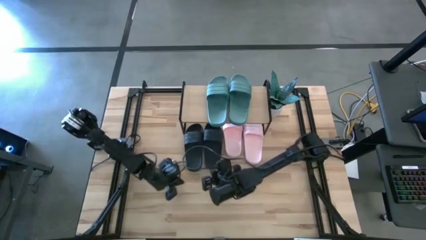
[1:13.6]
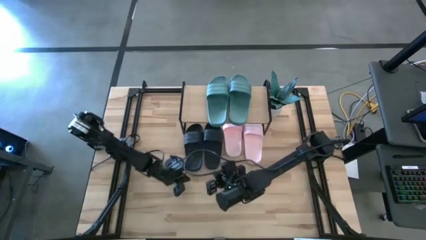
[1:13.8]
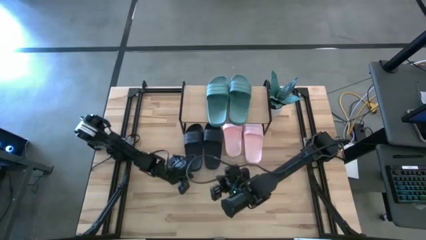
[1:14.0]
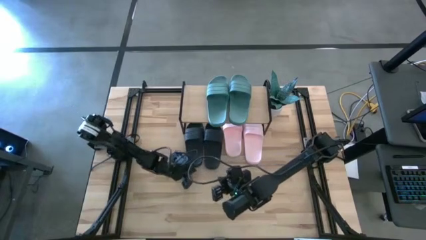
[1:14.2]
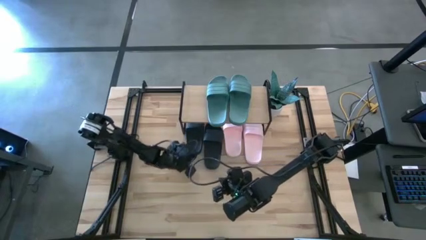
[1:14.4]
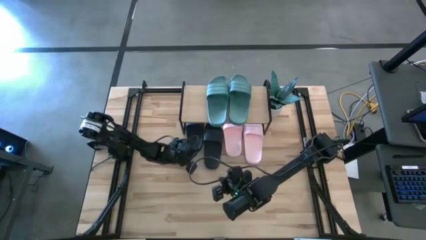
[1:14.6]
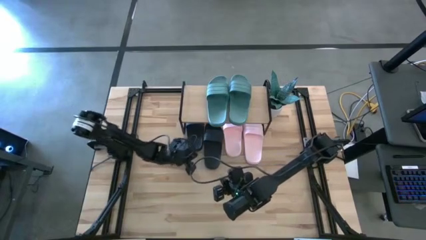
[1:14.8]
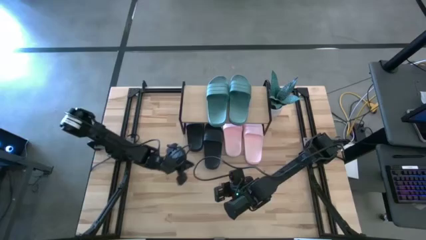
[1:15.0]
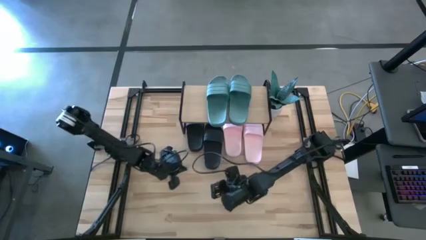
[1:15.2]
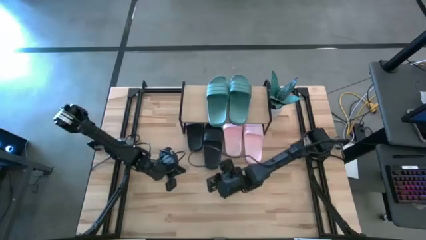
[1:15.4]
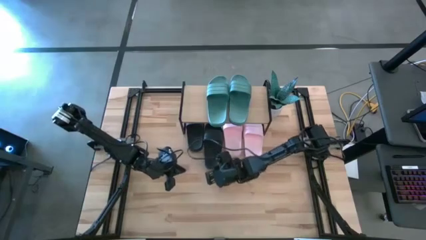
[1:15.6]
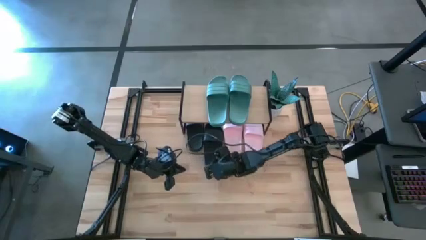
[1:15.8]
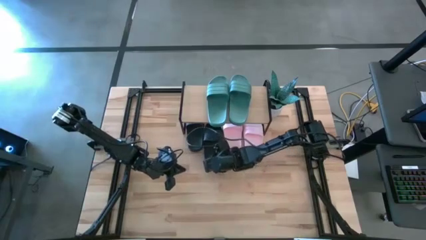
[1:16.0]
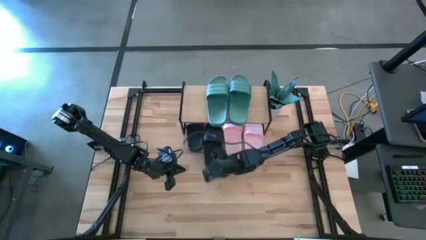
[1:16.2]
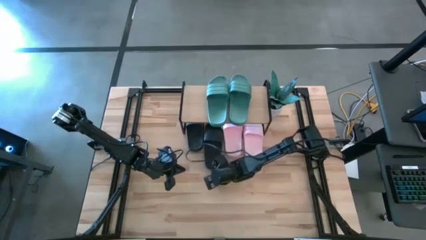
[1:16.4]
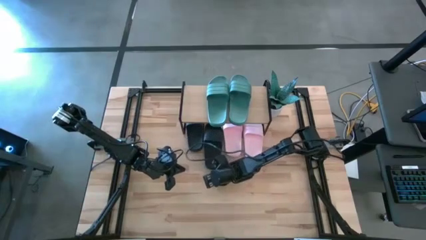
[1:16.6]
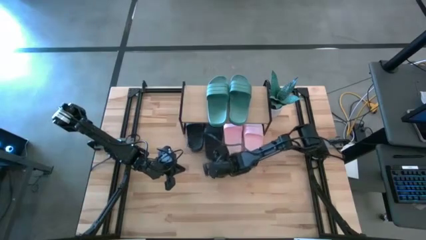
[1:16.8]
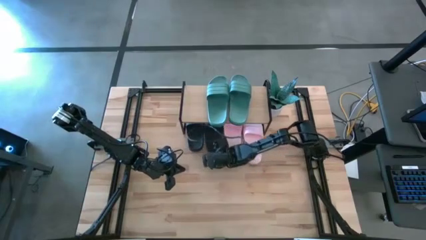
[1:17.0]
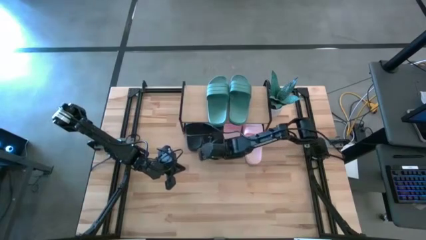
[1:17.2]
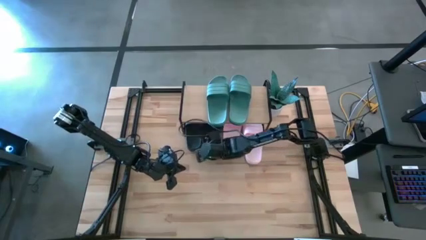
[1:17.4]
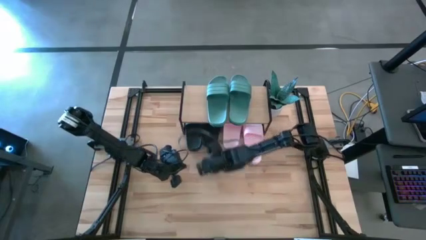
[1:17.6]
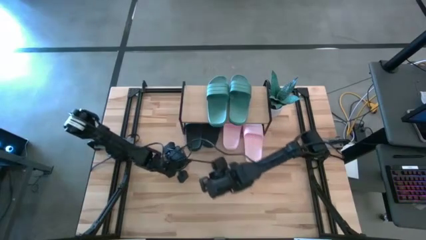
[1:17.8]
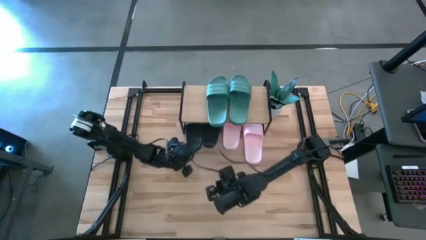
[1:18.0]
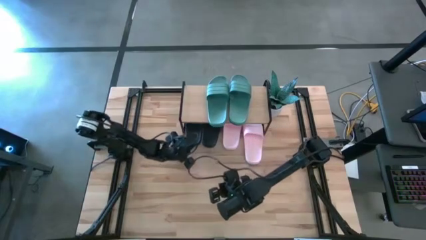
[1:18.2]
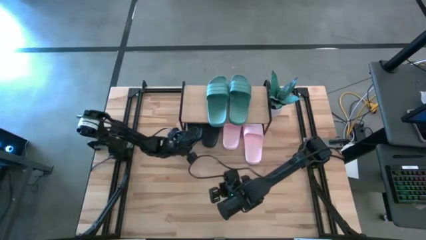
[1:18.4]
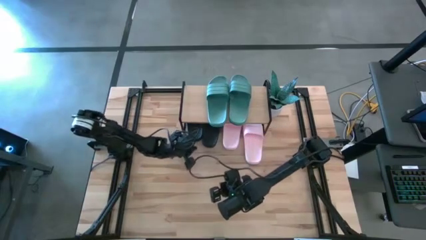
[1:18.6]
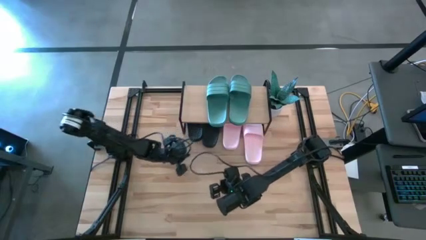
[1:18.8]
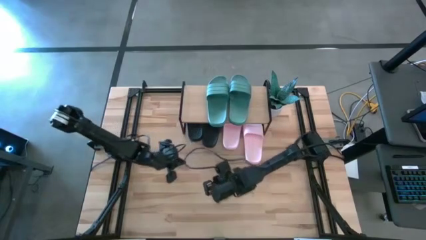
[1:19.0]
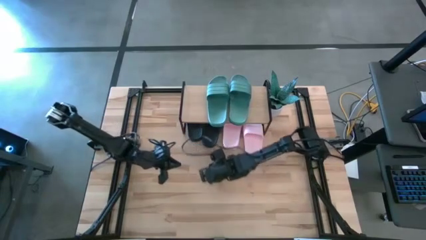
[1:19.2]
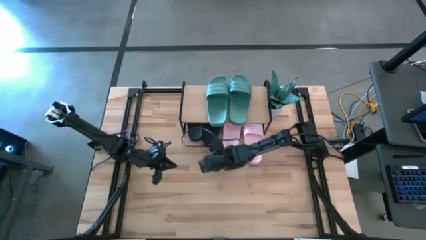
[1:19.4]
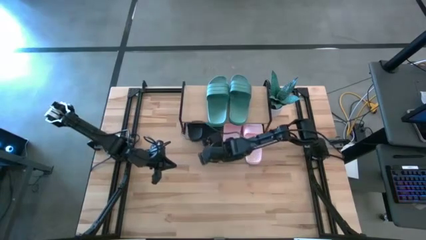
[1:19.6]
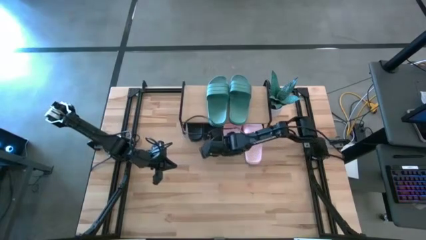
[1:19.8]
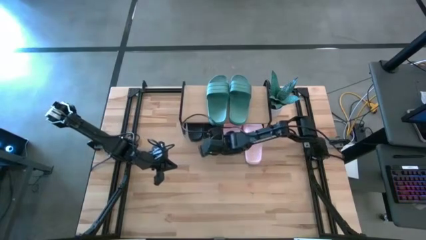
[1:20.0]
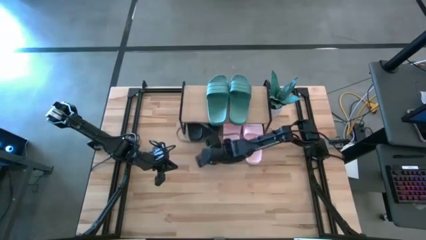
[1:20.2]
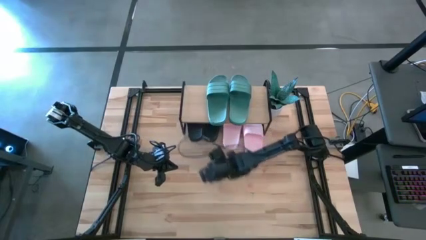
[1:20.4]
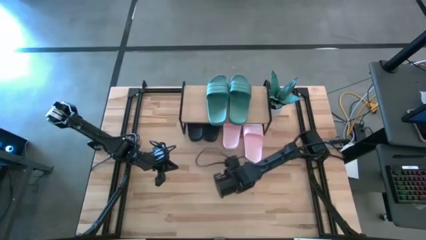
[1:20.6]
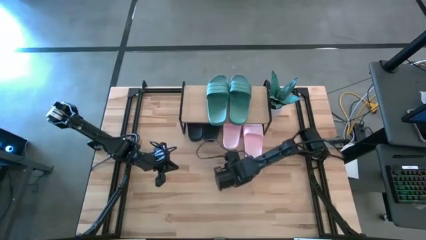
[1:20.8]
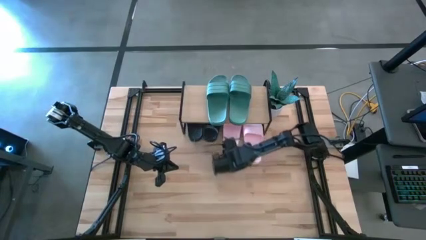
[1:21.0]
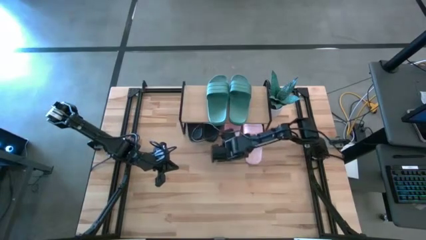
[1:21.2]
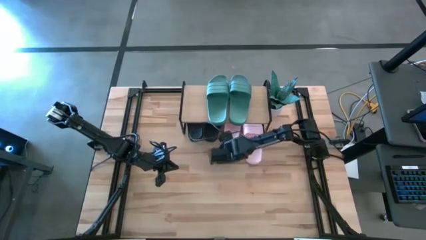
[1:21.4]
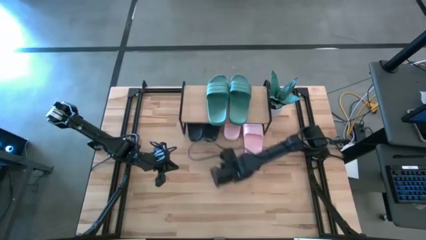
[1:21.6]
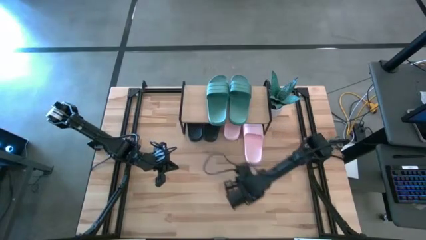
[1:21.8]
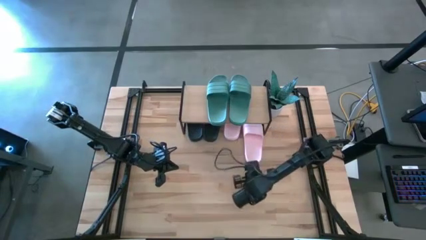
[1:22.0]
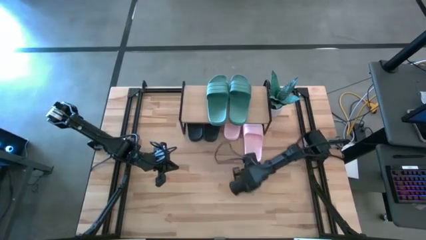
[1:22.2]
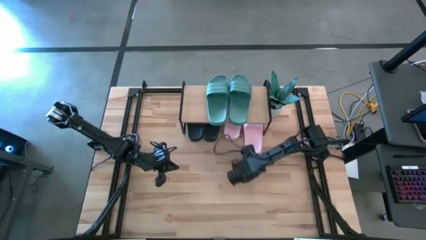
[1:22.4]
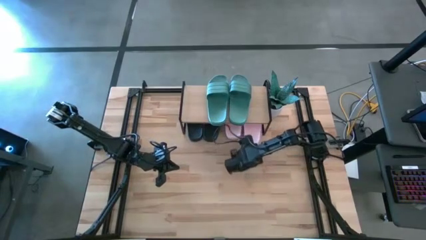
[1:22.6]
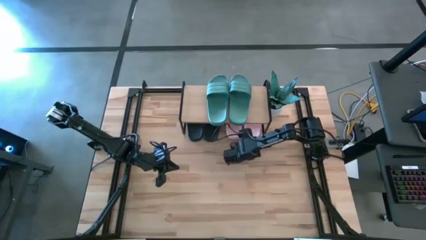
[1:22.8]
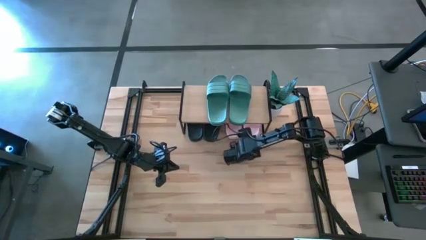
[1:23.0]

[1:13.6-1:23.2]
Task: Pick and place slides into the shelf
Put the black pair of slides under the shelf

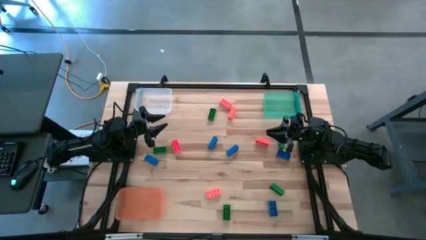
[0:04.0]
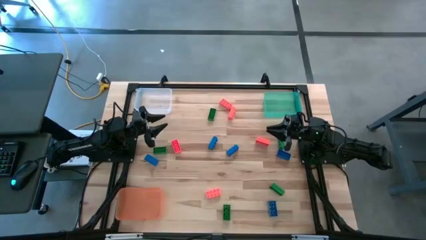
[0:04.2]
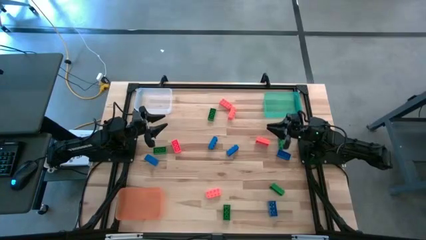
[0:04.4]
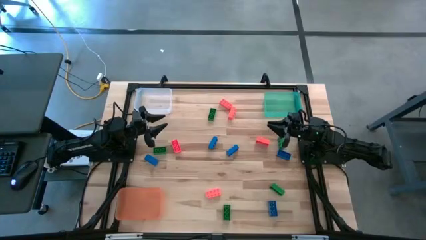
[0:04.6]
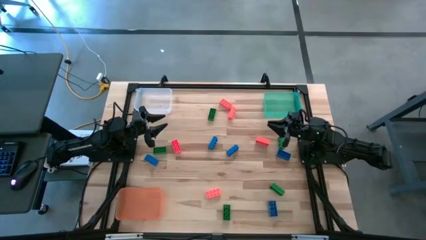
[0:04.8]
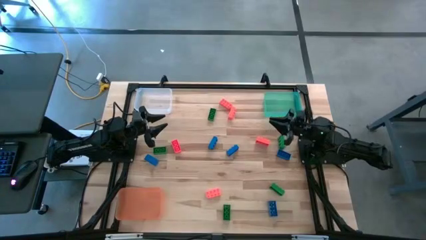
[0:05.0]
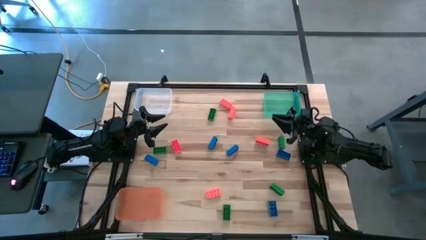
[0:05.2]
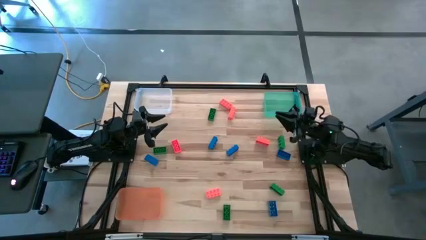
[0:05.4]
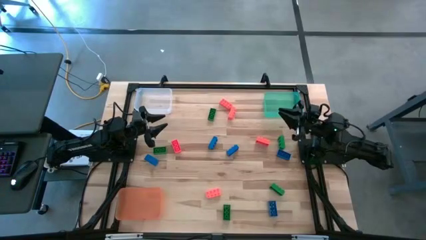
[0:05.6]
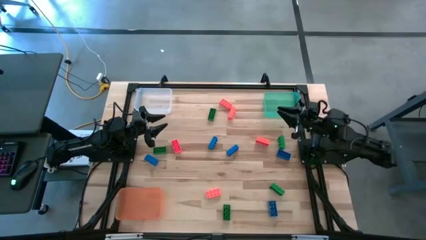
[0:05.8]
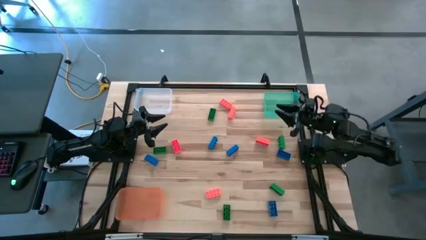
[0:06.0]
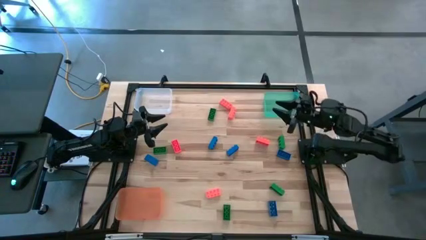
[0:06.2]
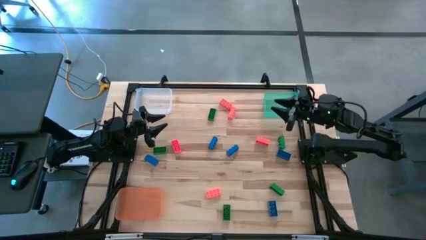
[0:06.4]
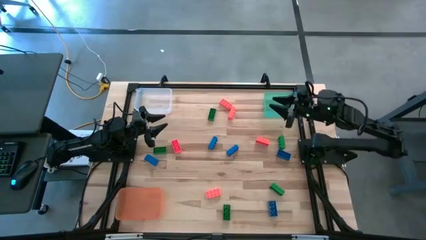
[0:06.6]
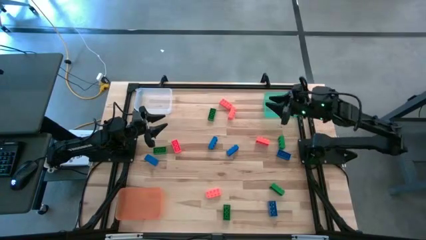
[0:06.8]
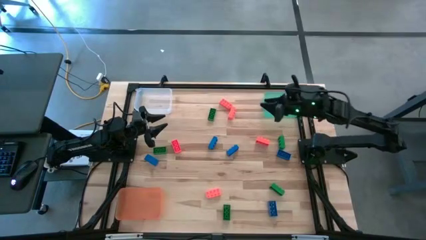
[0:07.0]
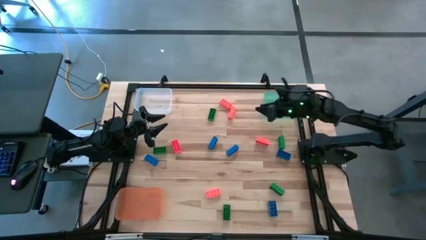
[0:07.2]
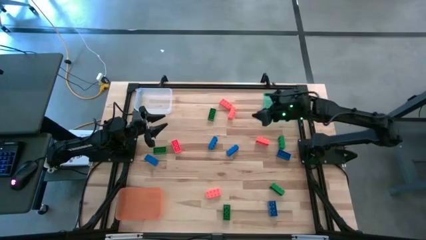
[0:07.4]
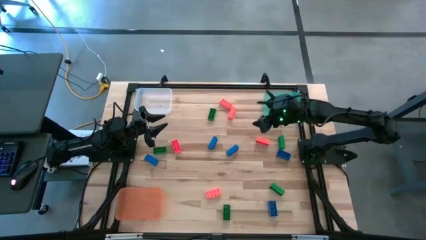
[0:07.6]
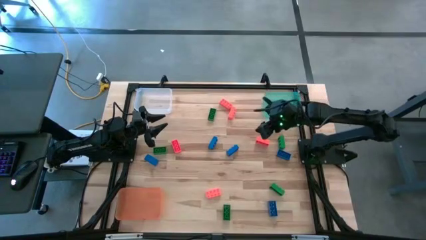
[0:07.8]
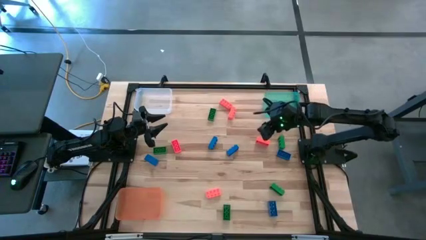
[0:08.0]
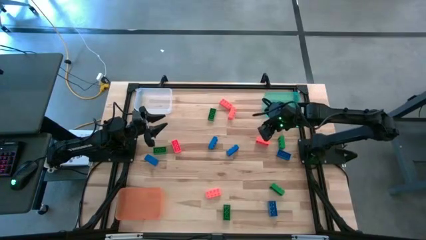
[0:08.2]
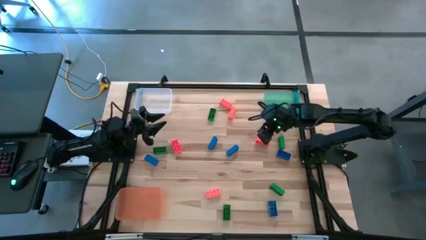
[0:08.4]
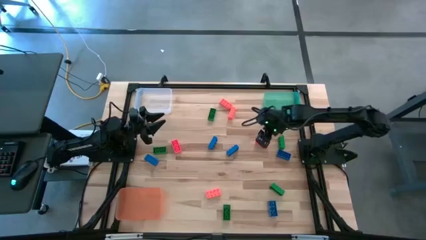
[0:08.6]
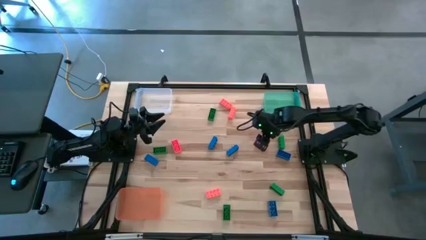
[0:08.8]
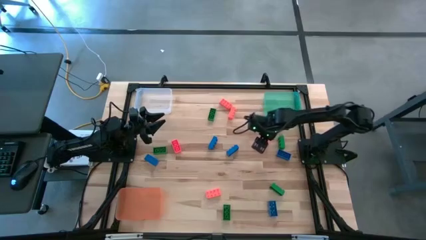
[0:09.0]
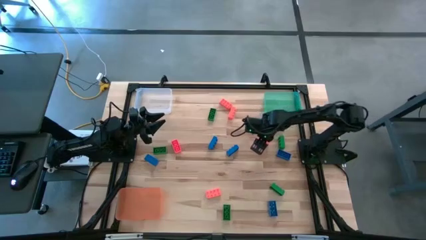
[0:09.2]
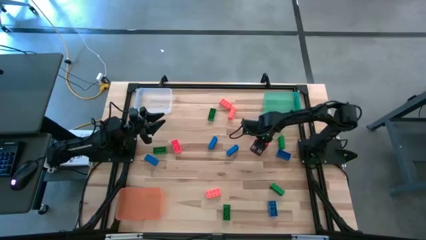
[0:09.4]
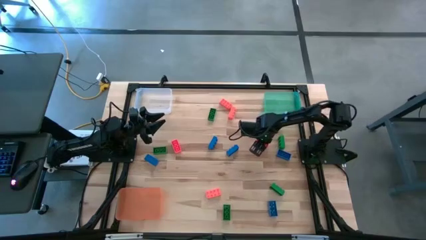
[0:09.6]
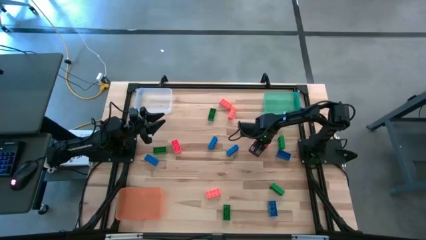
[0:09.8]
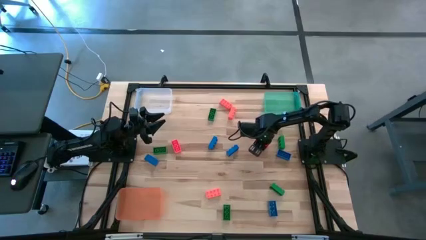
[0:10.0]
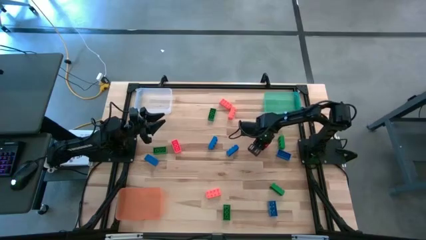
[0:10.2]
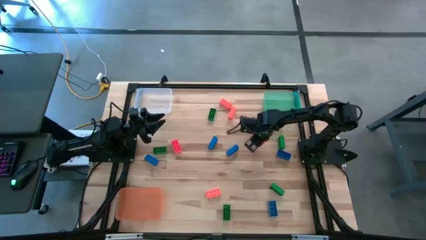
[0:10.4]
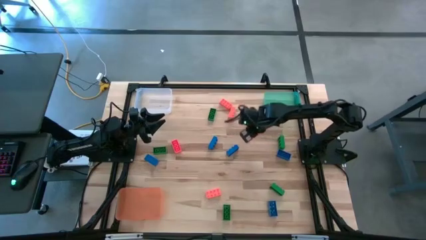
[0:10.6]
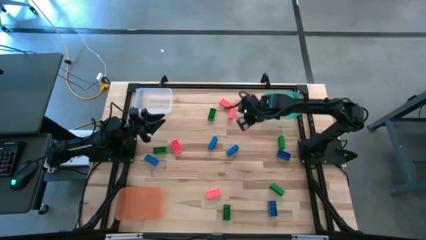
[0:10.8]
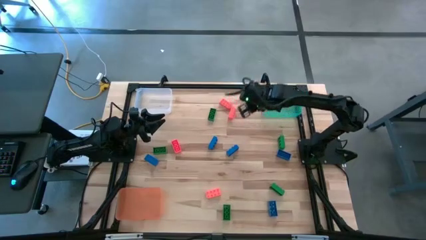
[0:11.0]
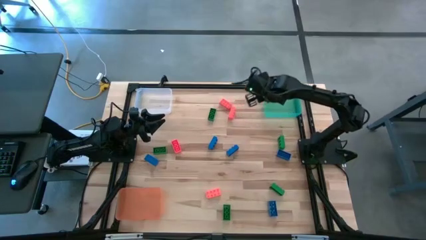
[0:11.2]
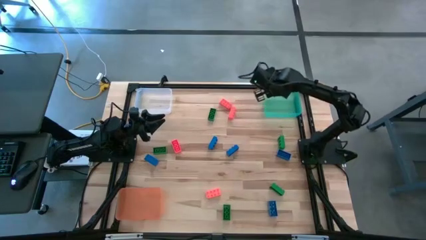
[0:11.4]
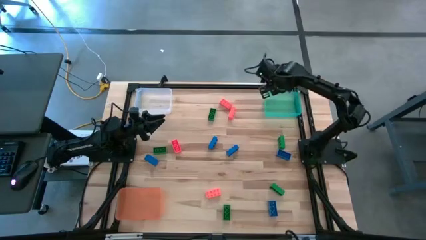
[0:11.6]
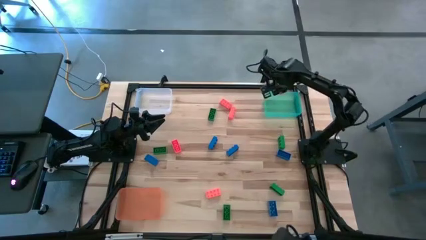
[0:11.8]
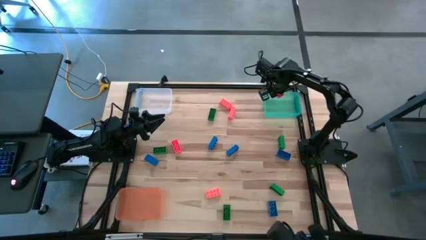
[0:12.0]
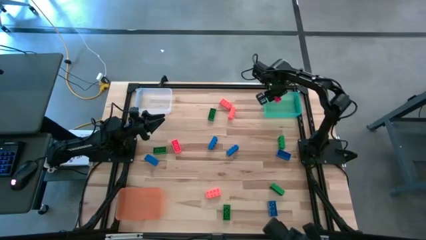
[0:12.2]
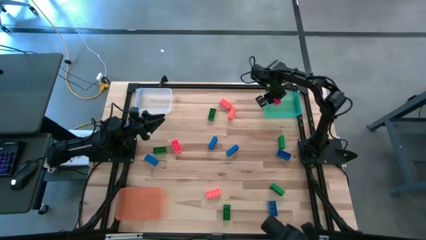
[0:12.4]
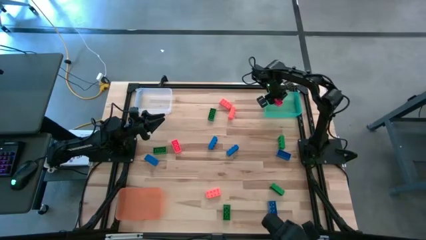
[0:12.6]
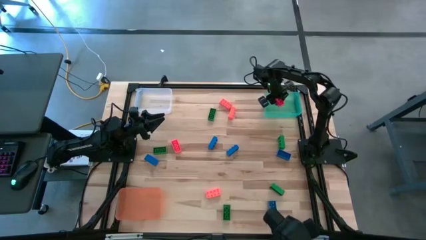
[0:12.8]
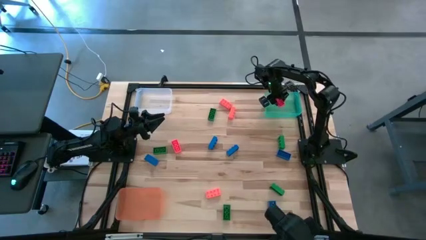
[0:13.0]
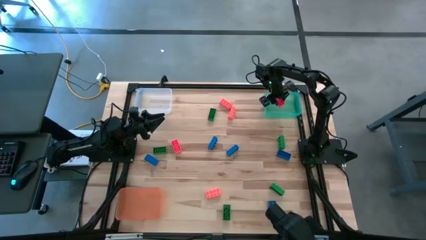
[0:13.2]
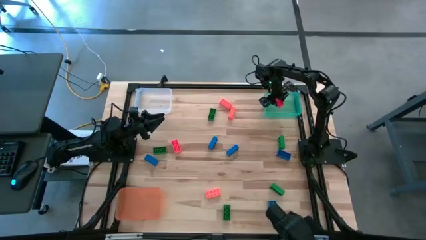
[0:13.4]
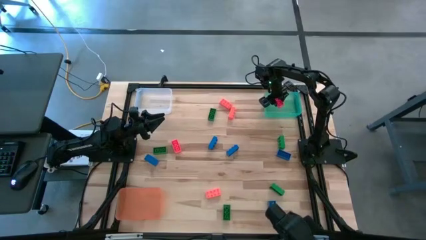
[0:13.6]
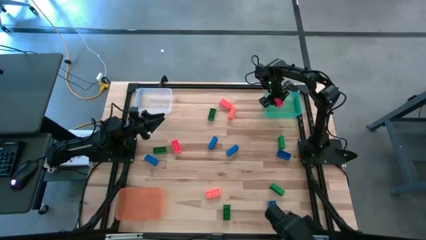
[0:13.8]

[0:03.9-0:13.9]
Task: Sort & place blocks by color
Put the orange game piece into the blue bin
